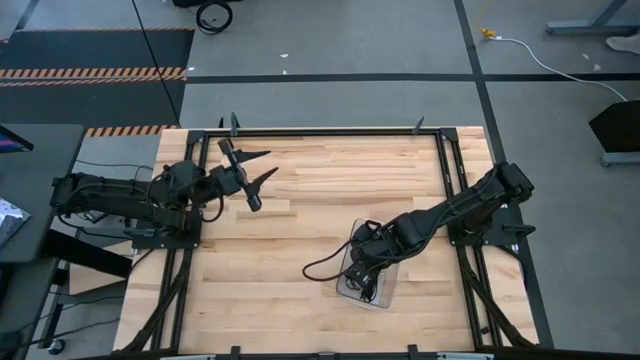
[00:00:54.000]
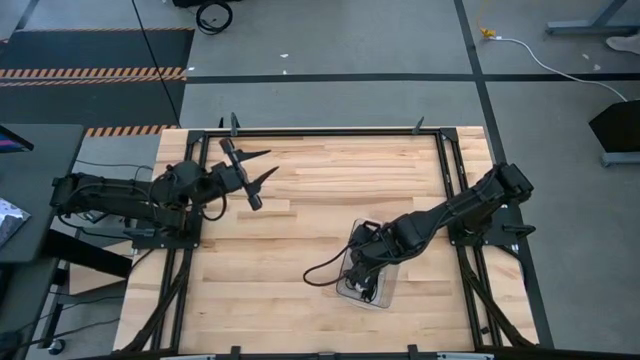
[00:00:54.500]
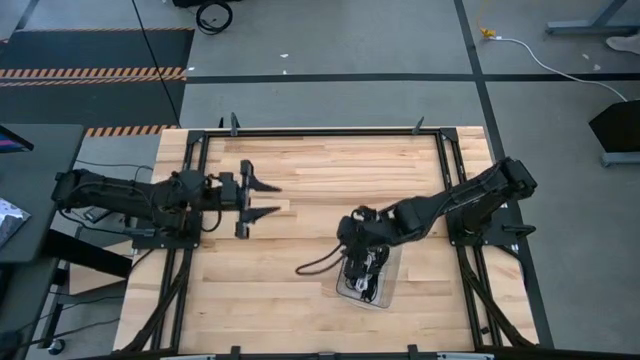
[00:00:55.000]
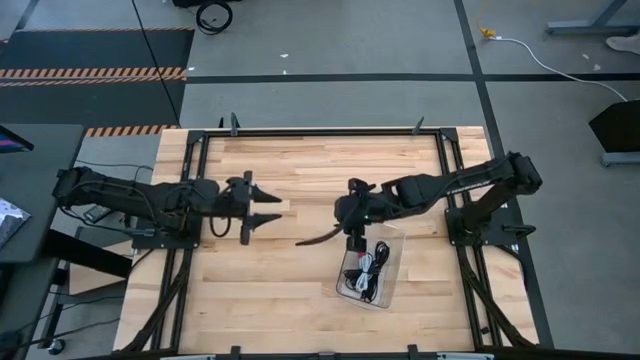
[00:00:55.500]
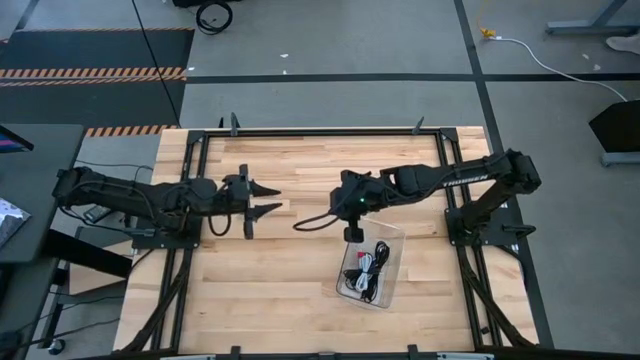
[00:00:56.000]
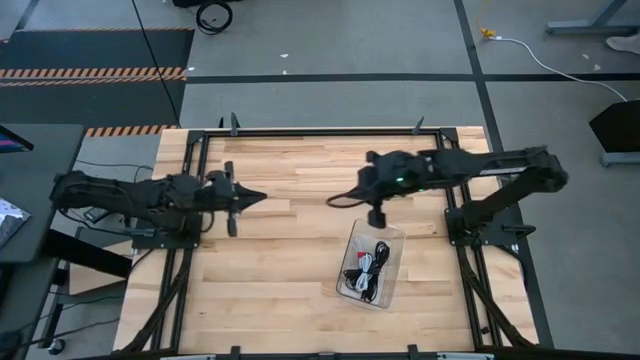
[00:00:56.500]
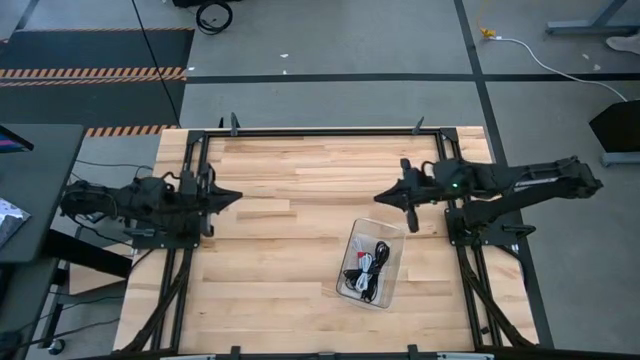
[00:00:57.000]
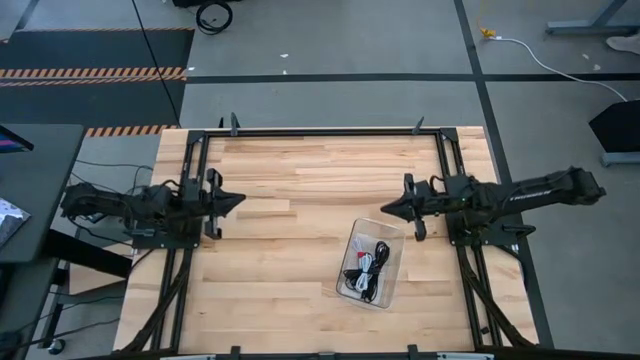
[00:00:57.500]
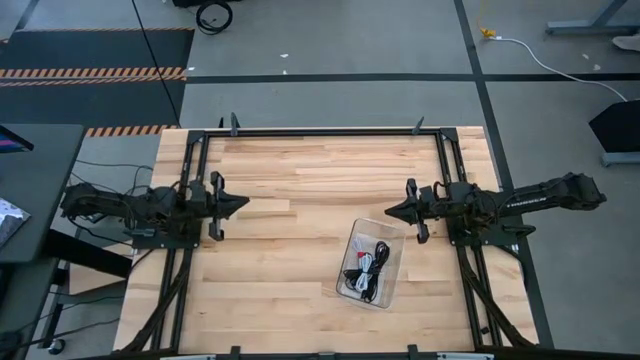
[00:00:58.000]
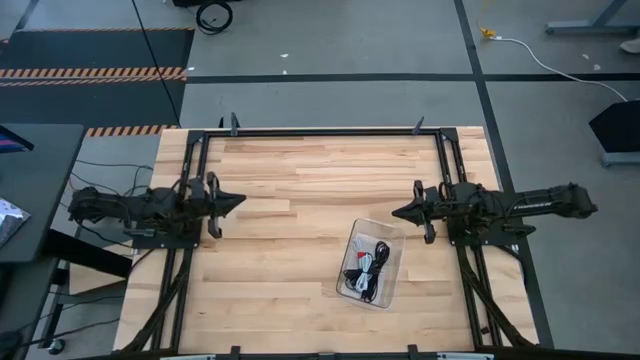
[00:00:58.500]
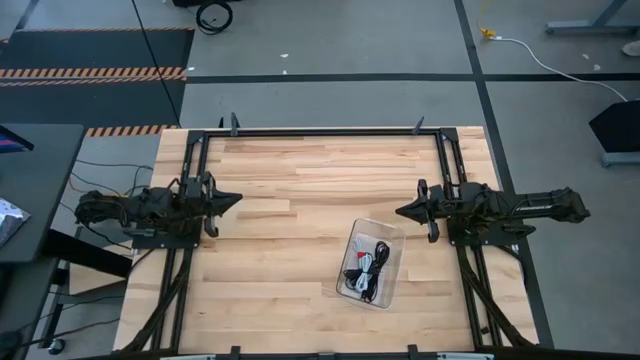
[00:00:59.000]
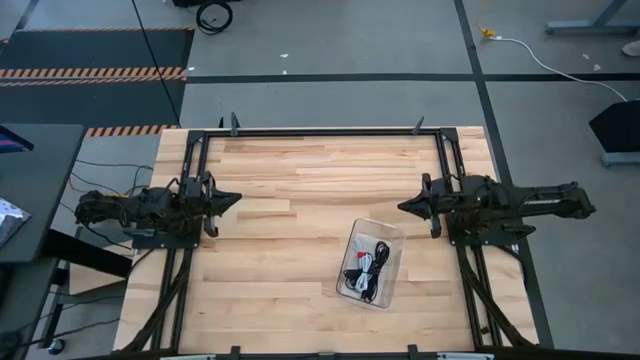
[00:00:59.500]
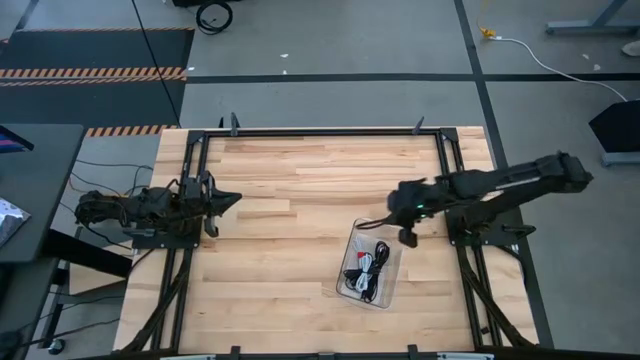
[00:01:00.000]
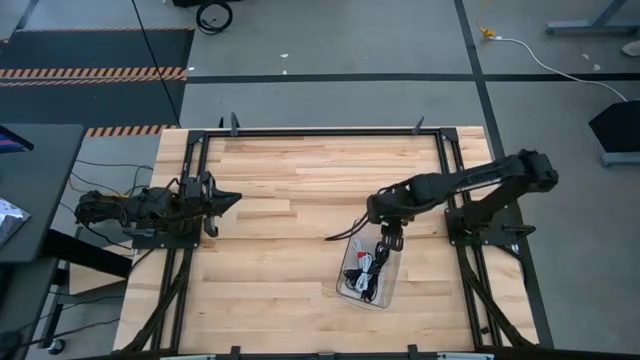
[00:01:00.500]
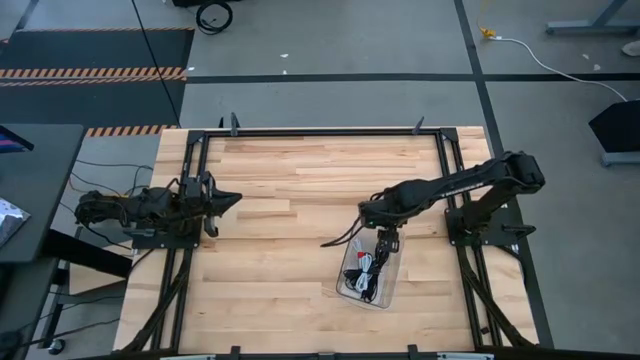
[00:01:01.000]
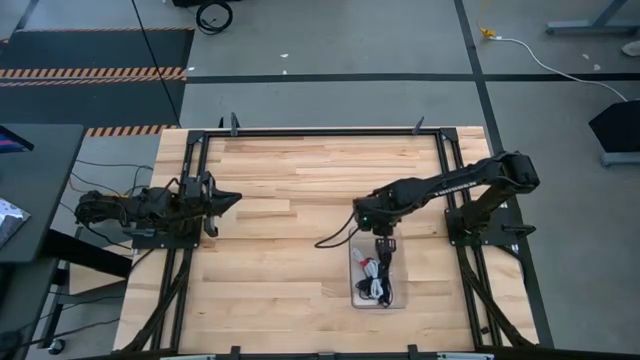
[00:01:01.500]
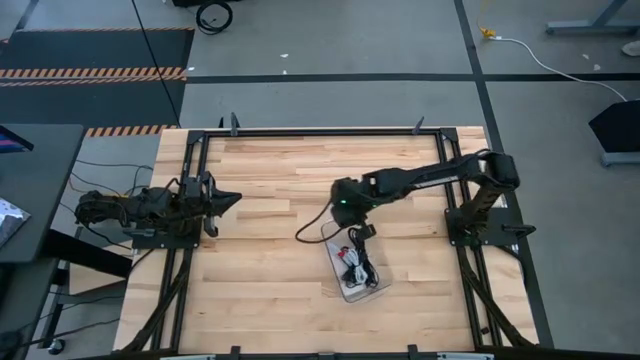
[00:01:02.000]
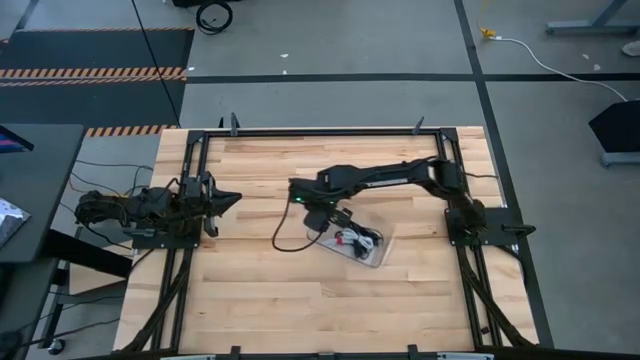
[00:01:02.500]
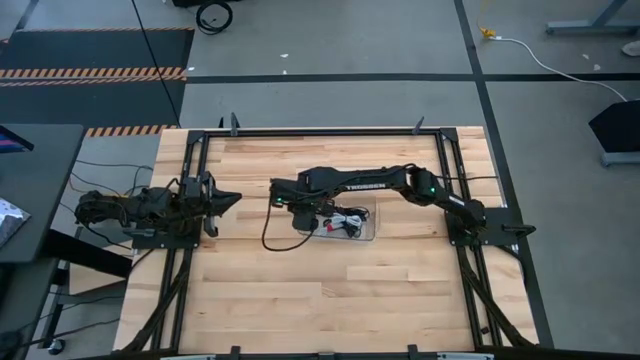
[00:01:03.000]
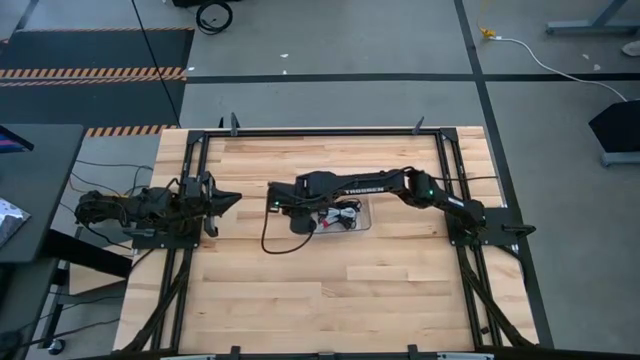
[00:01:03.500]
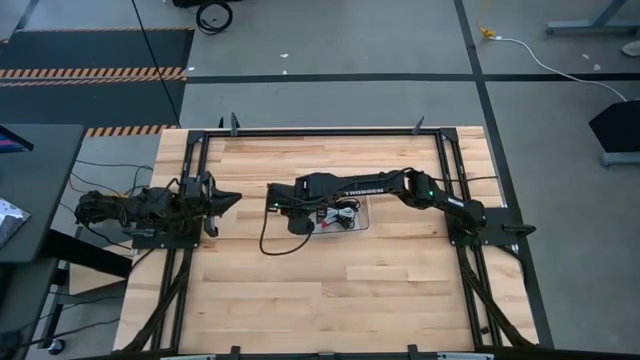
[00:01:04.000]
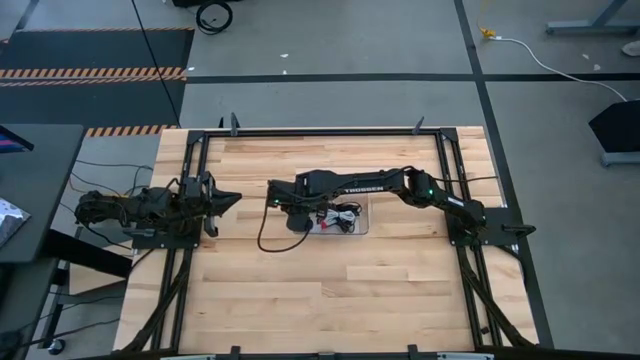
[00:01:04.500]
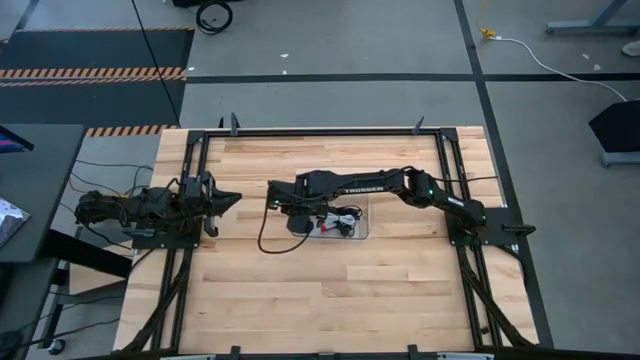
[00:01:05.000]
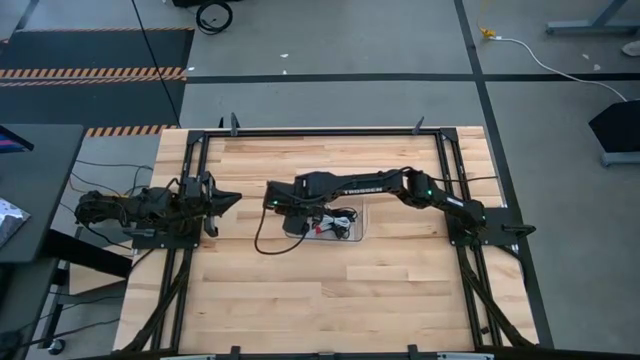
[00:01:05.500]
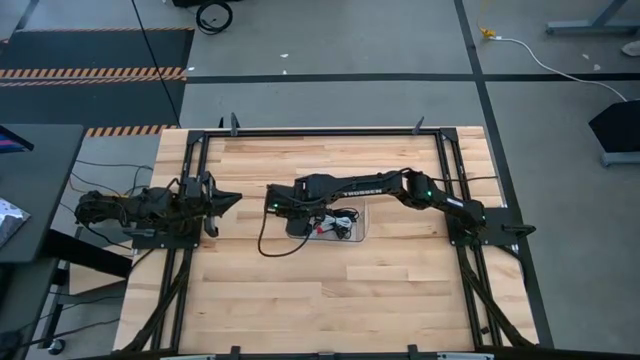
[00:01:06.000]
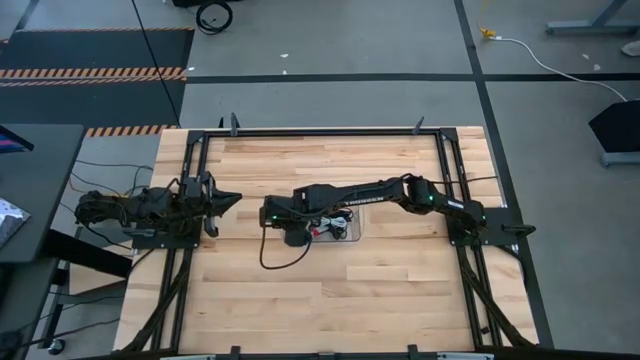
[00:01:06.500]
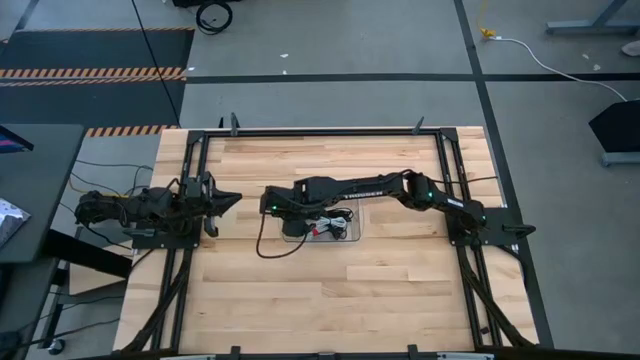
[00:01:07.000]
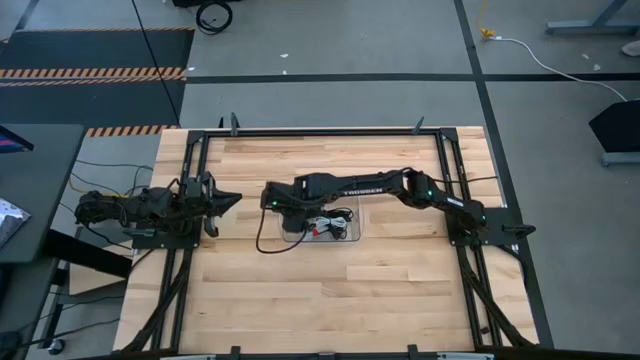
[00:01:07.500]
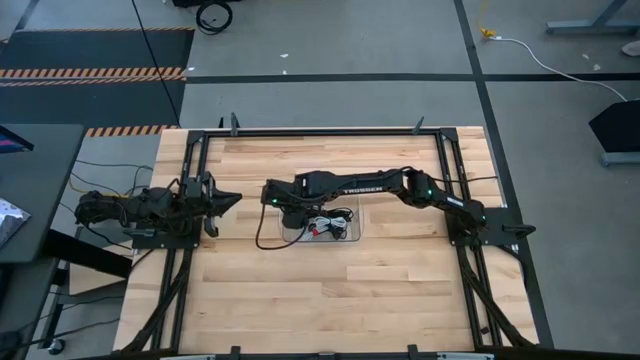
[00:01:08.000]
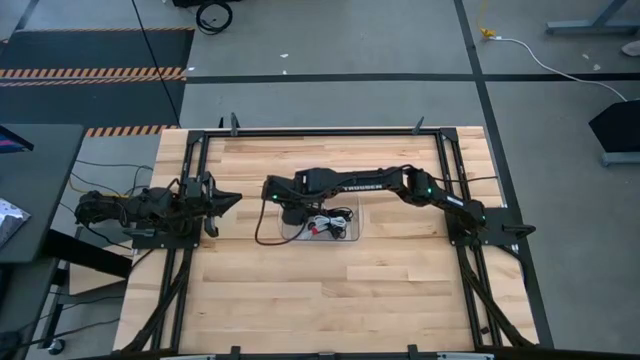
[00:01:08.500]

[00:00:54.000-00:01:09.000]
Task: Pick and place USB-C Cables
Move the transparent bin to the center of the table

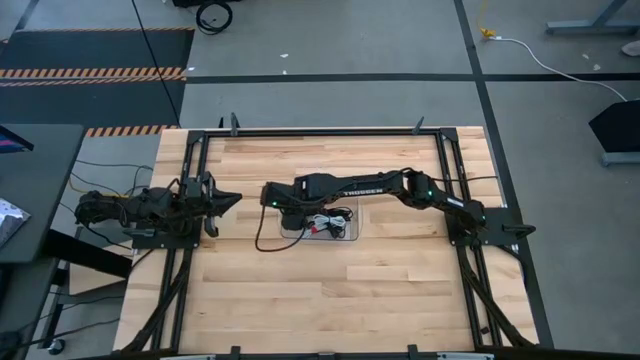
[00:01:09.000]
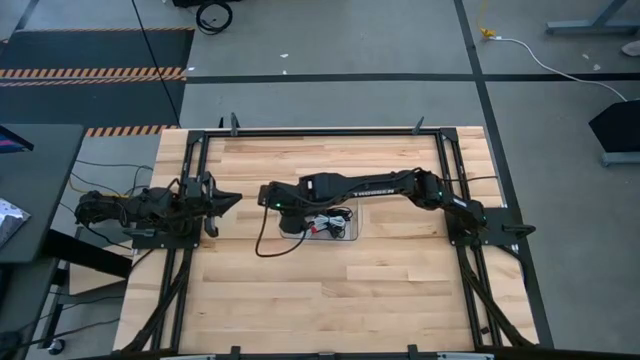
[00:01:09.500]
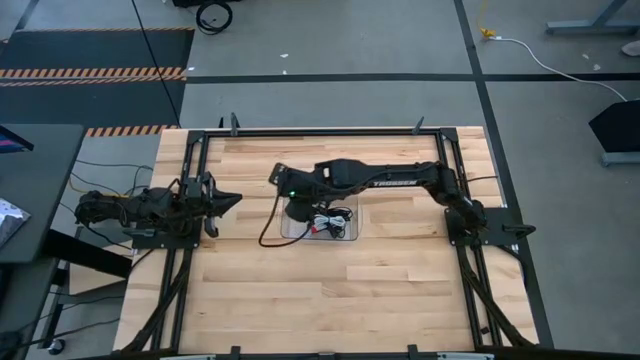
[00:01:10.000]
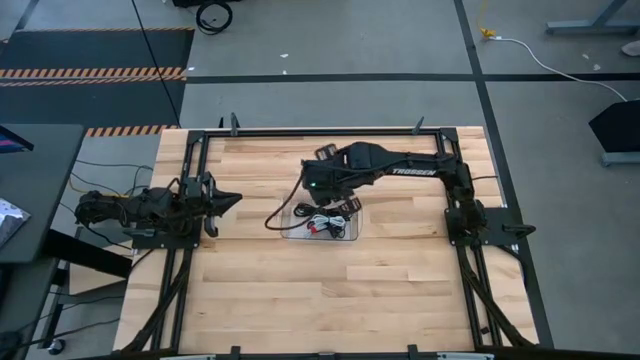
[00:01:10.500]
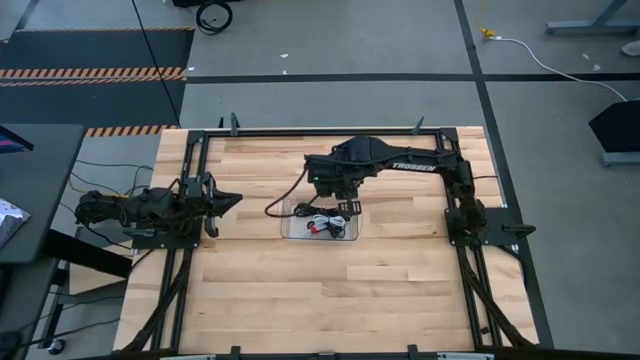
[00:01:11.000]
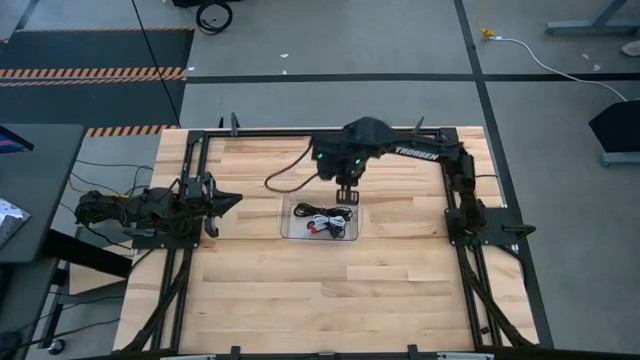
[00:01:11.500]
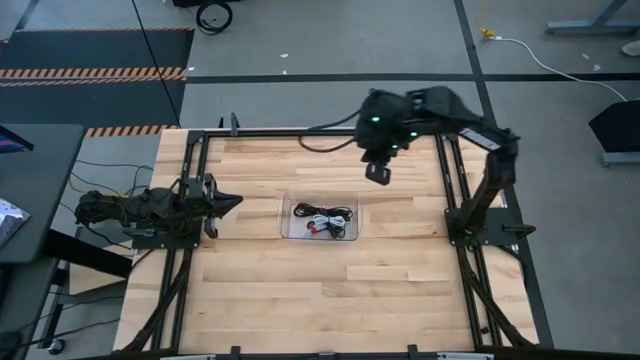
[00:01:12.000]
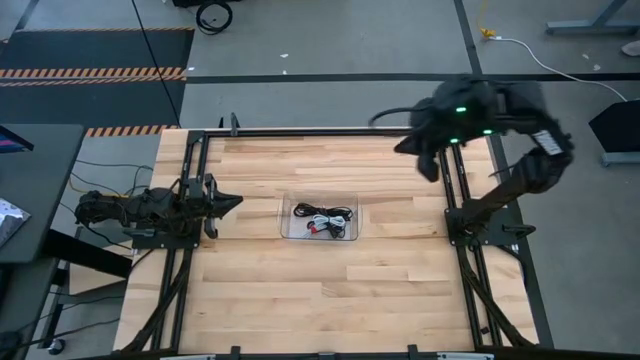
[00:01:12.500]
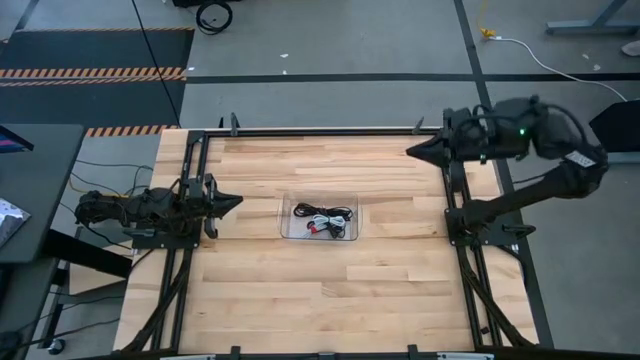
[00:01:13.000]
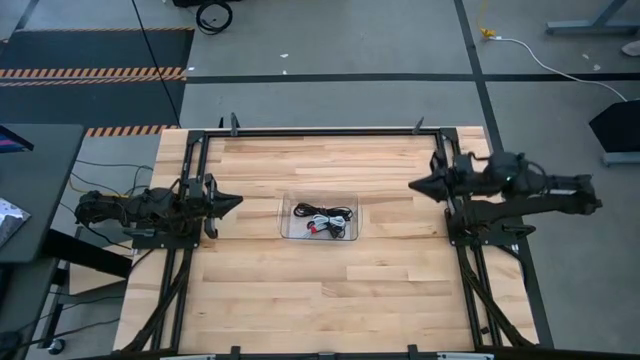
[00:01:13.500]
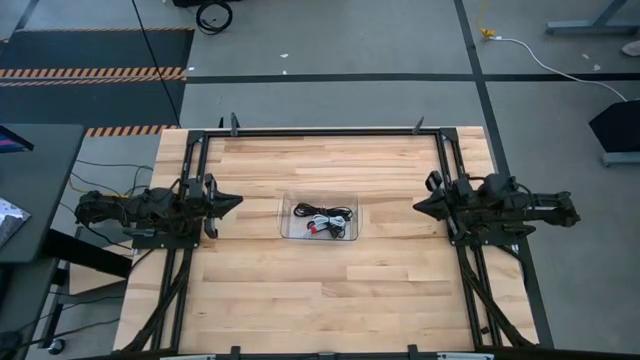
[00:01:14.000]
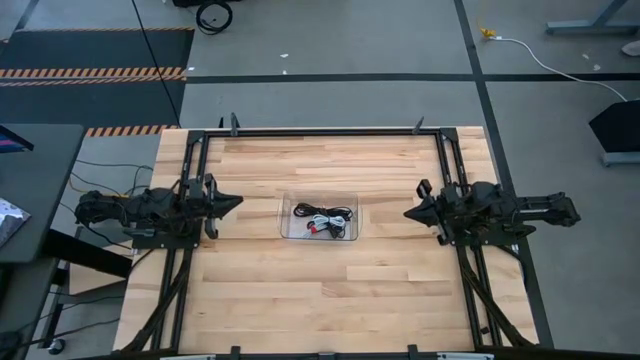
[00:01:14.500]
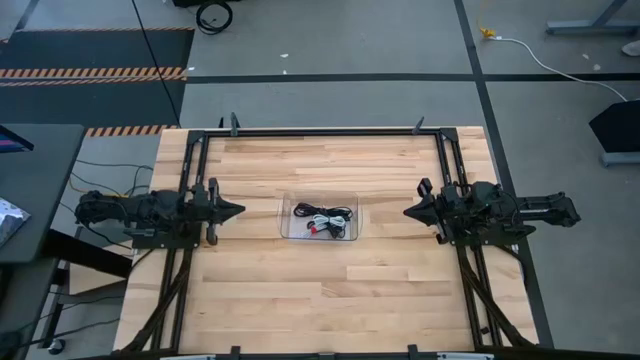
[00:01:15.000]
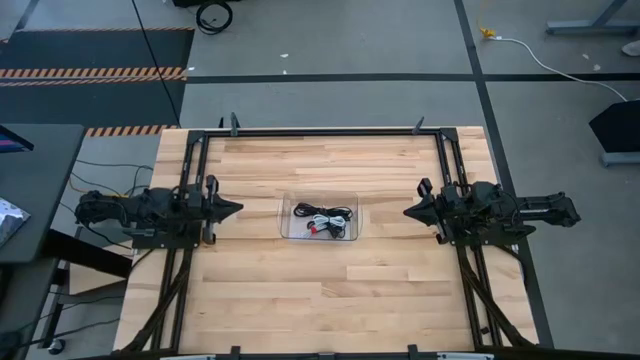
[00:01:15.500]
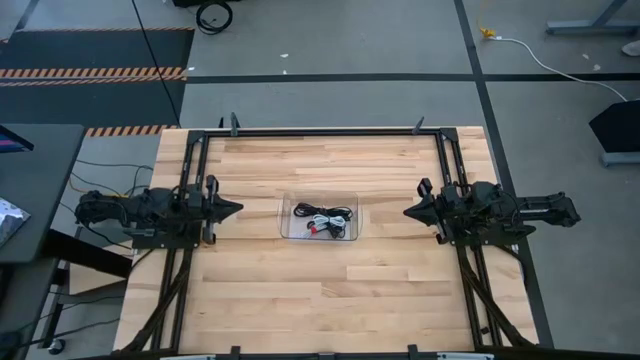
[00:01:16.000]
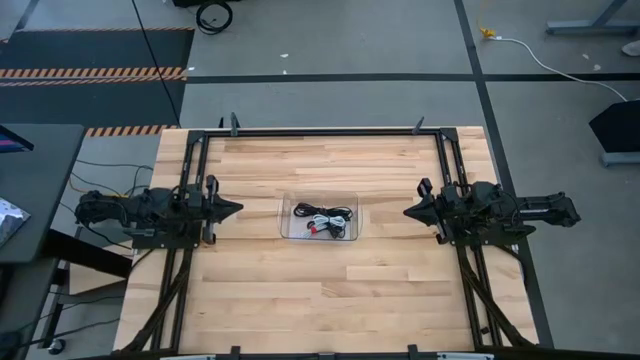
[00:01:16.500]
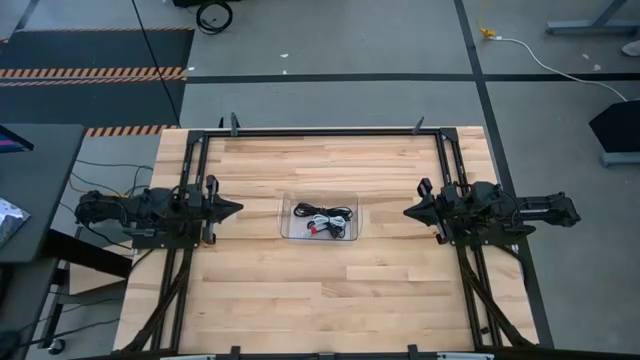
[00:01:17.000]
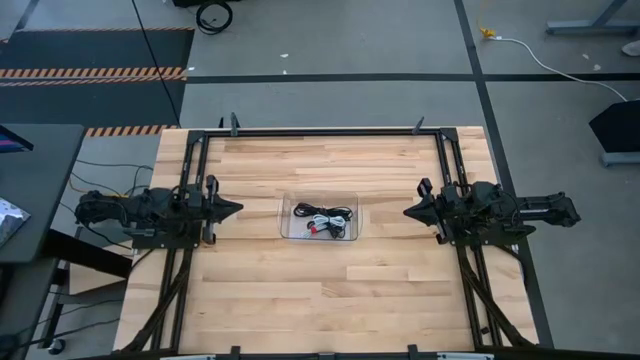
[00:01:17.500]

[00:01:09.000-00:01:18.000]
Return to Home Position
